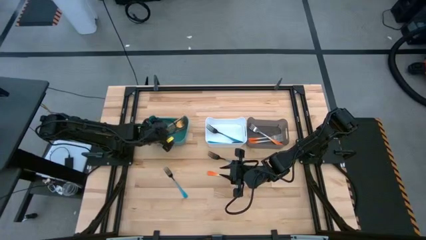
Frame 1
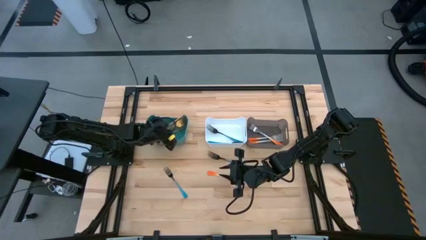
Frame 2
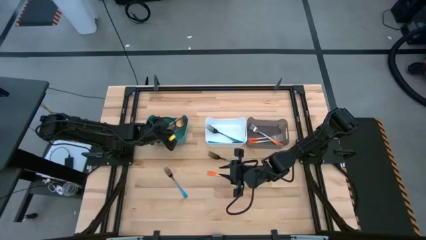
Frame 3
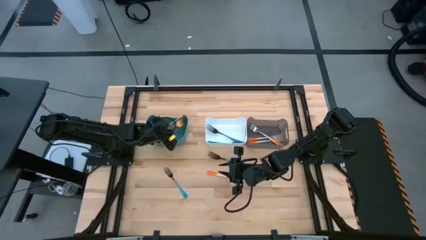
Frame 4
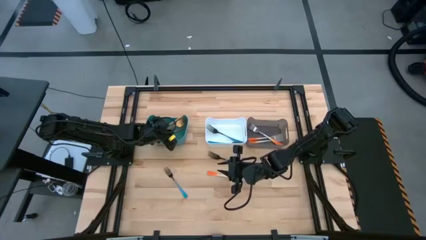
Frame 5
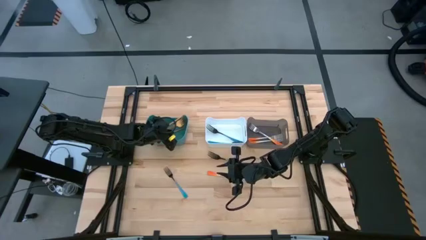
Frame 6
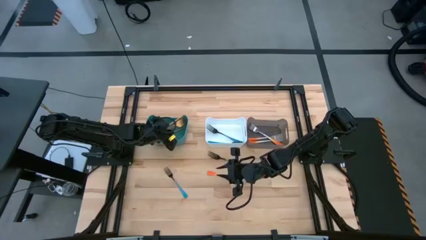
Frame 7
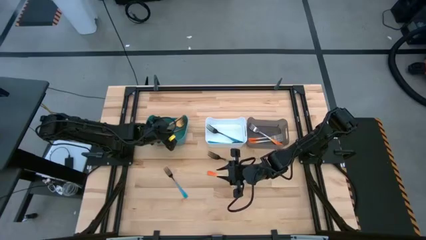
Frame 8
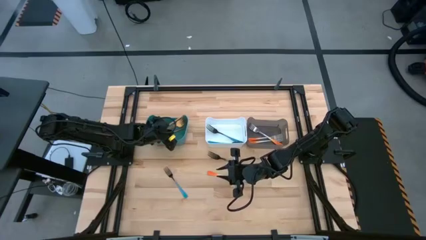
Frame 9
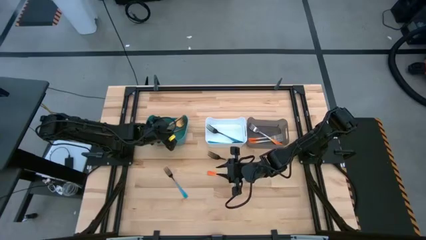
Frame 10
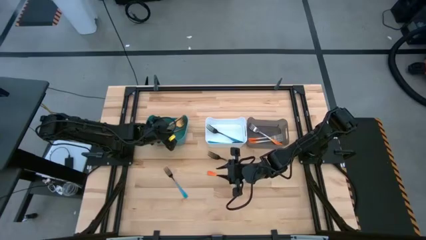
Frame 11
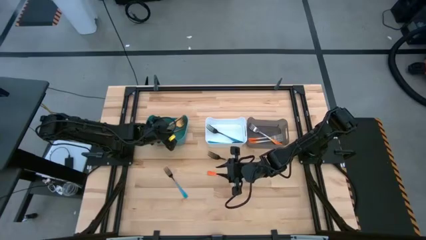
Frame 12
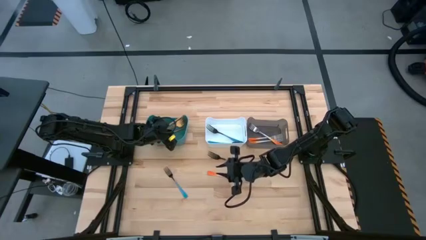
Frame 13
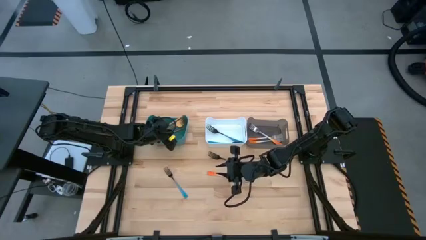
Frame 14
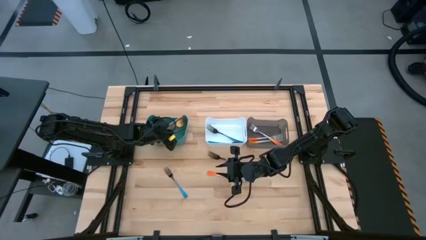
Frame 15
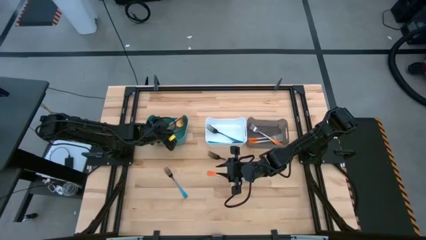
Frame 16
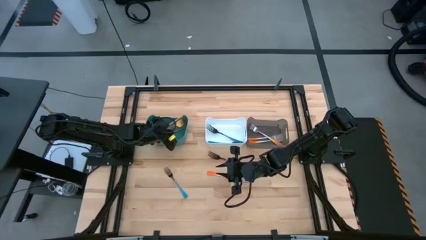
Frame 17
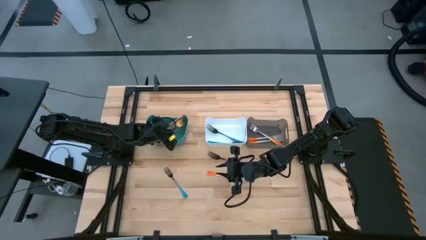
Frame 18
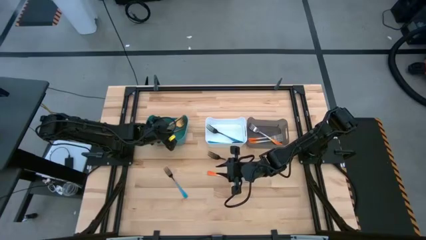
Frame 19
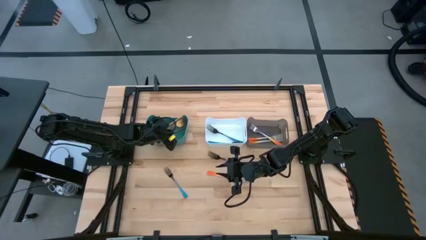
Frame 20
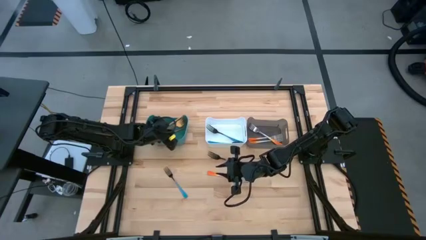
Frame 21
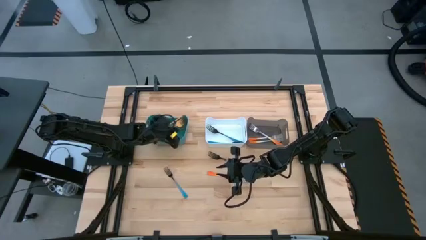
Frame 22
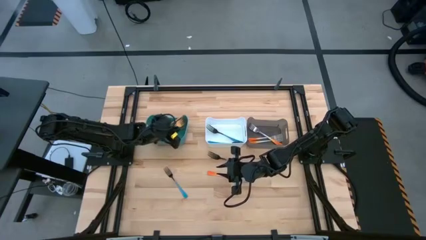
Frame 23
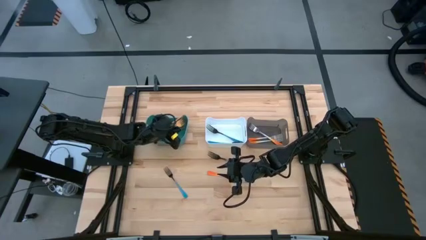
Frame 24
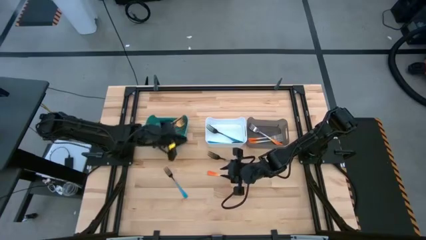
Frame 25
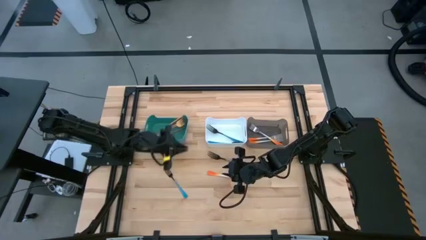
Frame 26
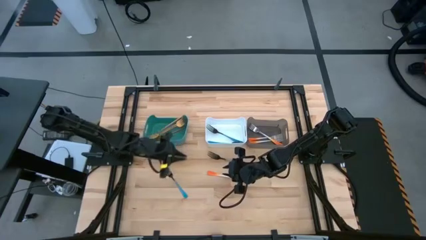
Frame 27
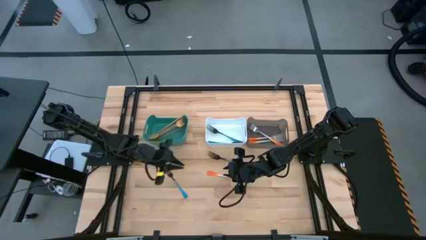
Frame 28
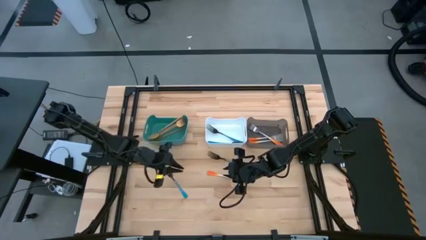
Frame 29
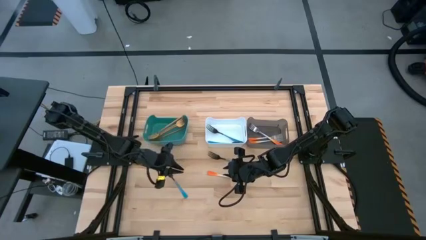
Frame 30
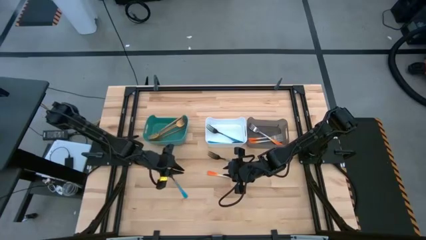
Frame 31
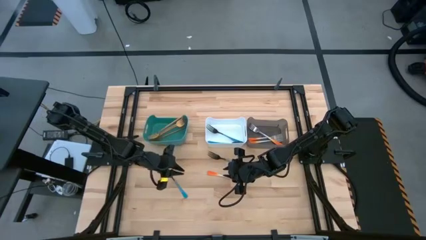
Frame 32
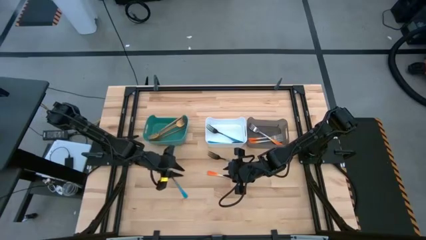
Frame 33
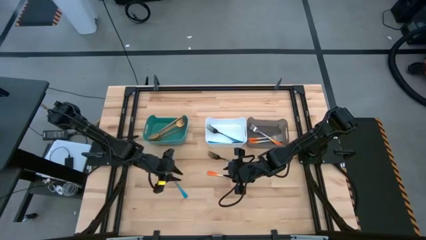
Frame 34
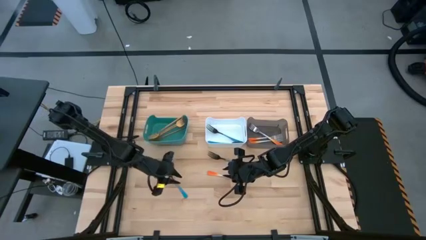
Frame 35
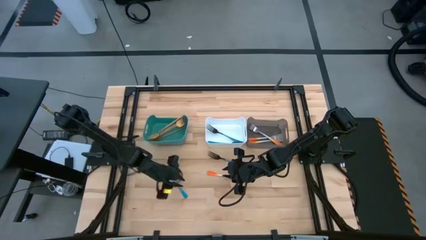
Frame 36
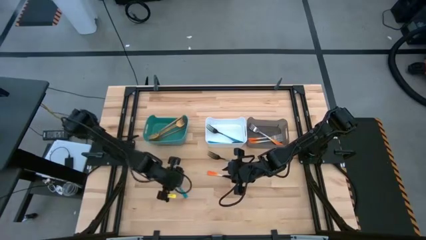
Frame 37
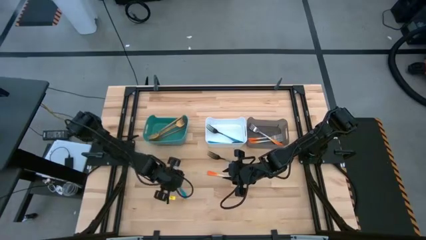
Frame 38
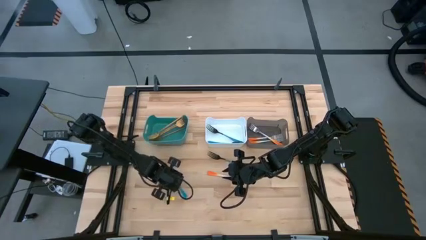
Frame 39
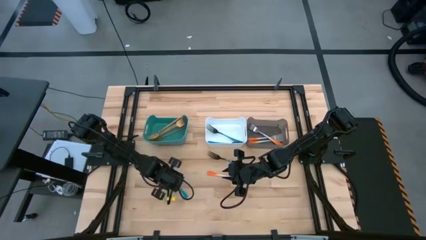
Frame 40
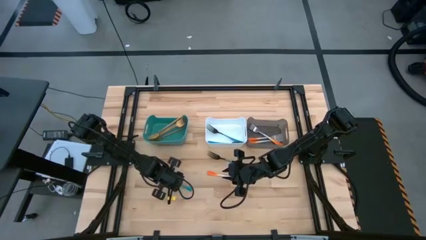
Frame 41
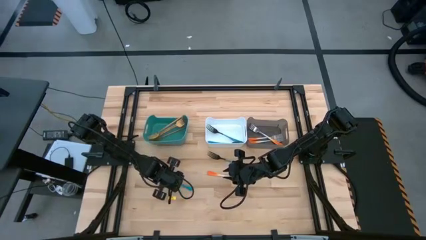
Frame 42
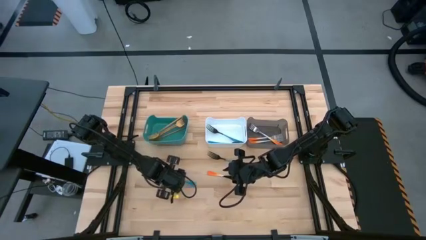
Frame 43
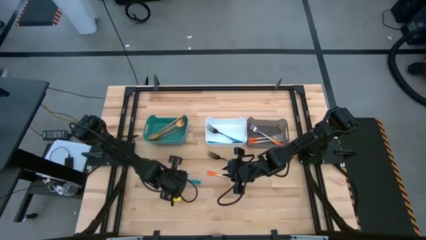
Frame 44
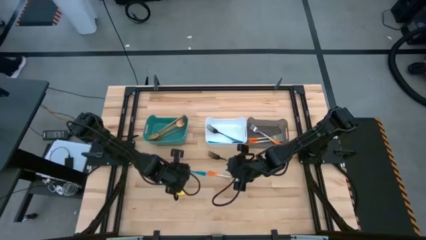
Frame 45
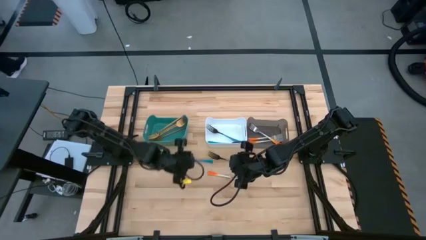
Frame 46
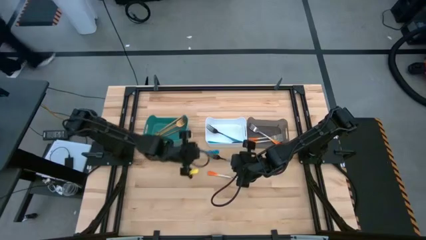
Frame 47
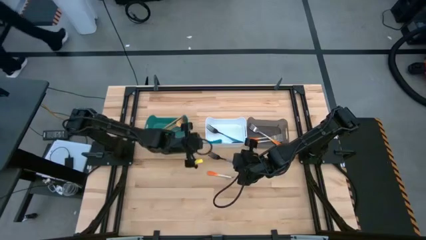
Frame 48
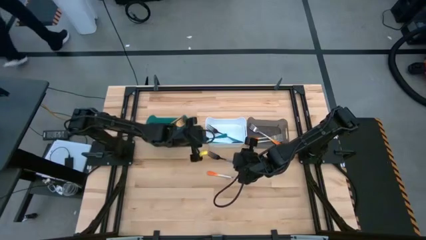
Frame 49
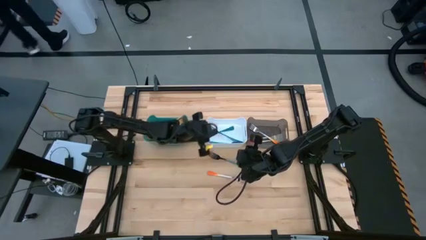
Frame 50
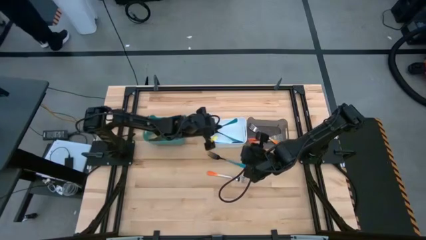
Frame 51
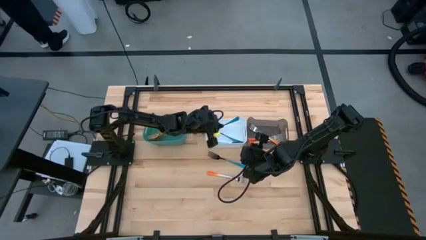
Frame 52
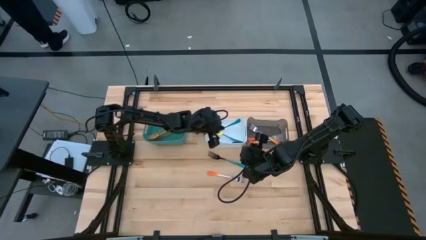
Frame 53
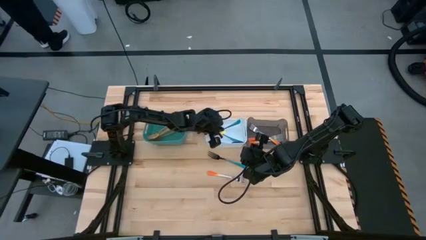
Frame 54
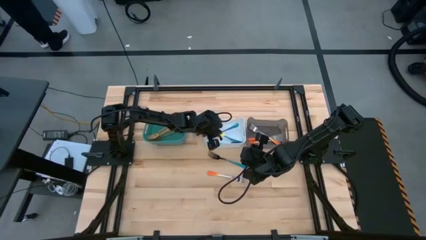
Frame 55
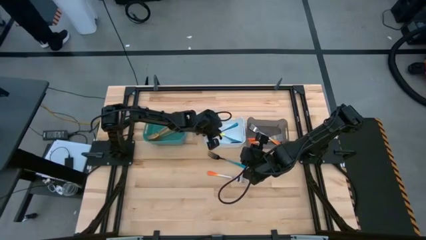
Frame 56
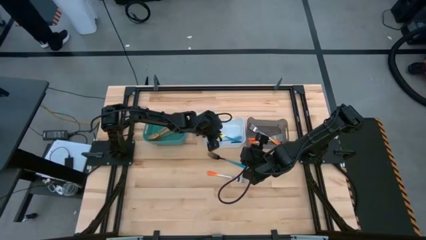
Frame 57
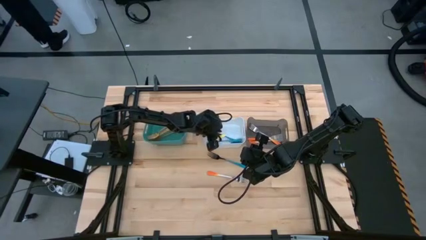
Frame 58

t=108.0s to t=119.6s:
Task: Sort silverware by color (type)
Put the left blue fork into the white bin

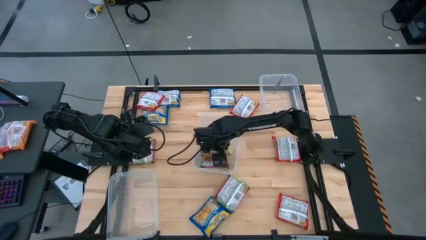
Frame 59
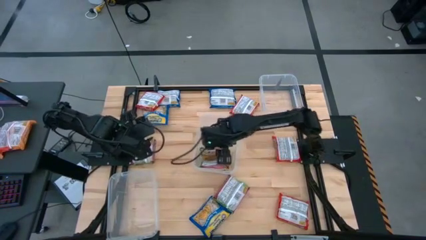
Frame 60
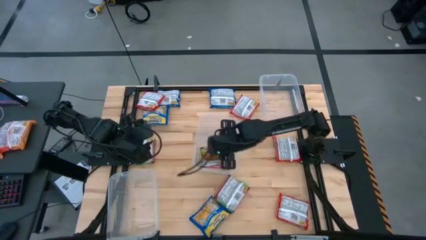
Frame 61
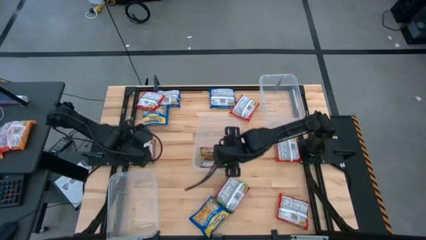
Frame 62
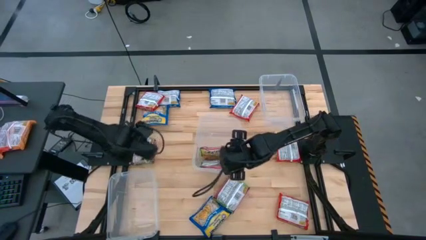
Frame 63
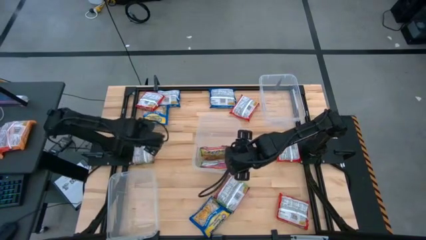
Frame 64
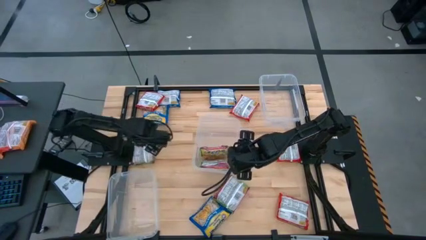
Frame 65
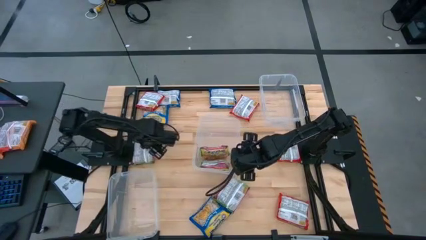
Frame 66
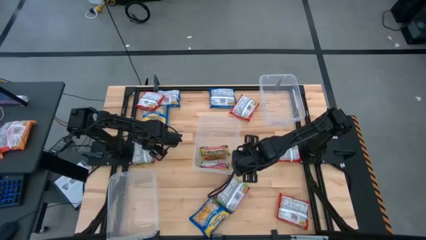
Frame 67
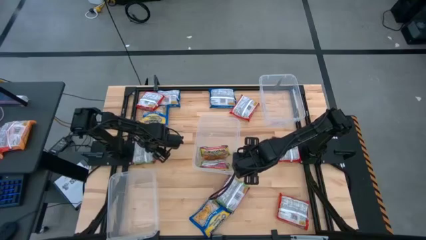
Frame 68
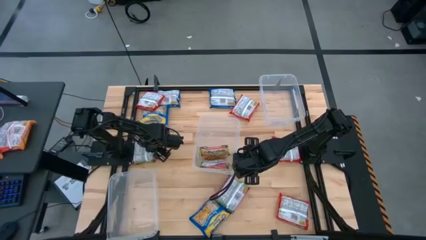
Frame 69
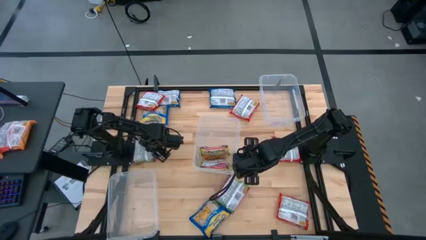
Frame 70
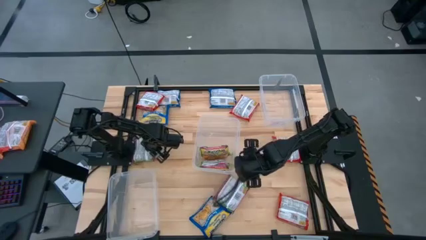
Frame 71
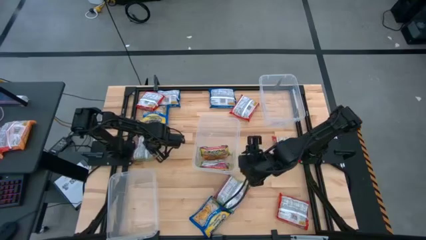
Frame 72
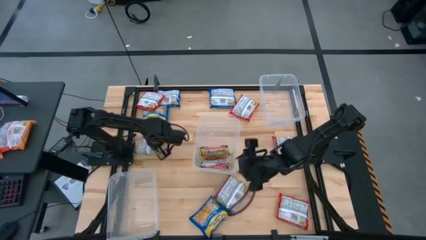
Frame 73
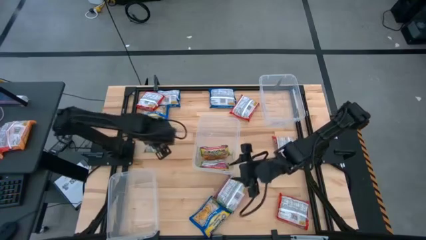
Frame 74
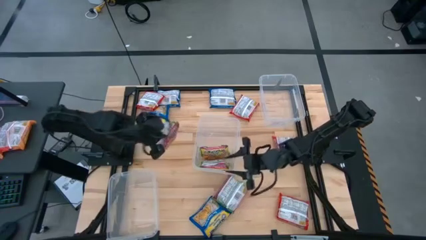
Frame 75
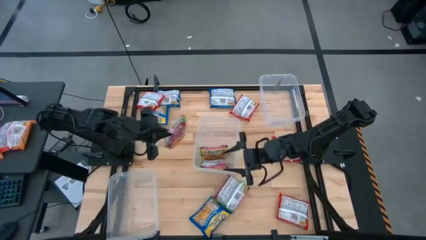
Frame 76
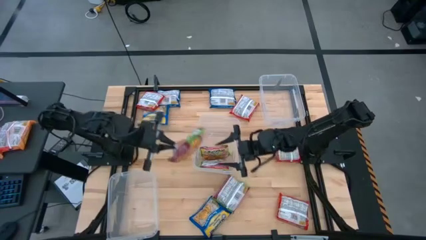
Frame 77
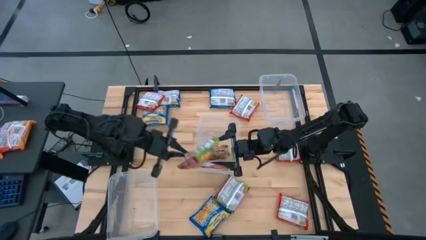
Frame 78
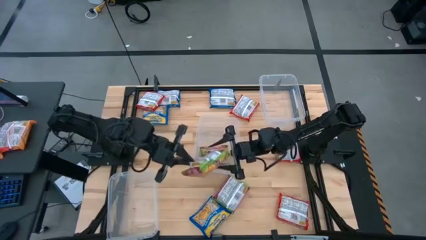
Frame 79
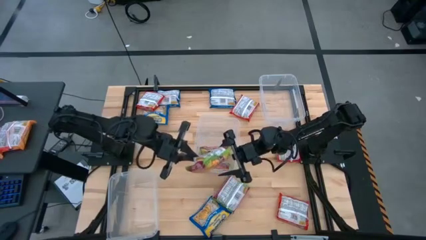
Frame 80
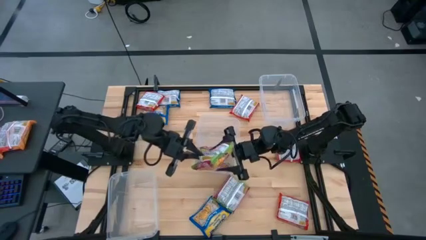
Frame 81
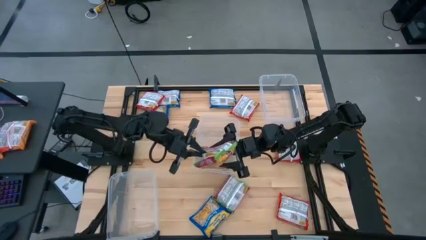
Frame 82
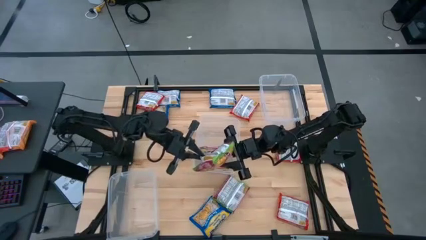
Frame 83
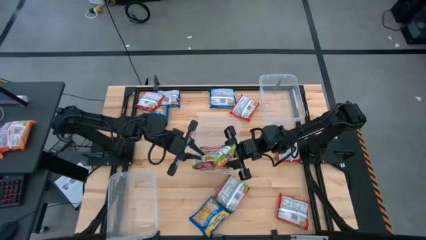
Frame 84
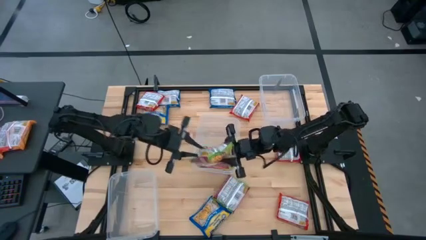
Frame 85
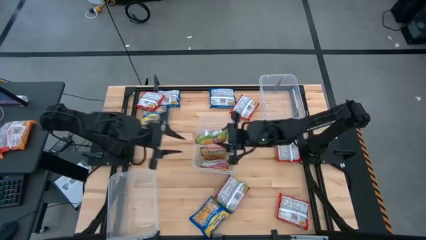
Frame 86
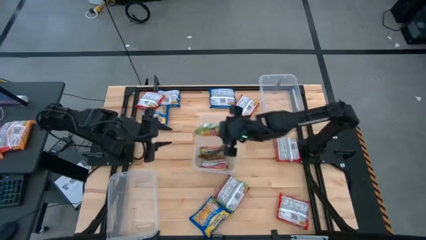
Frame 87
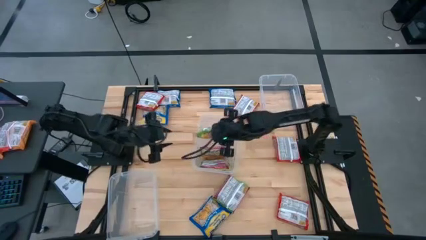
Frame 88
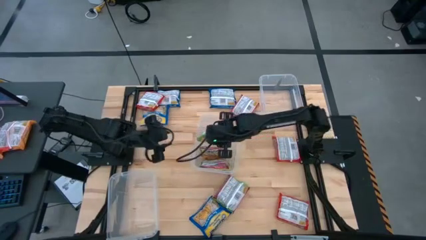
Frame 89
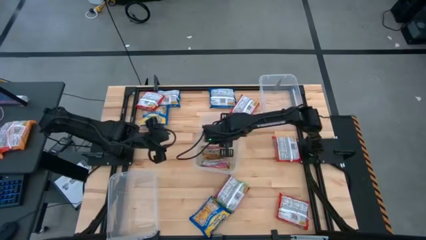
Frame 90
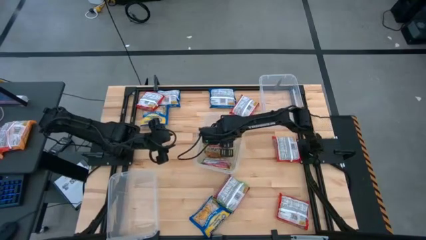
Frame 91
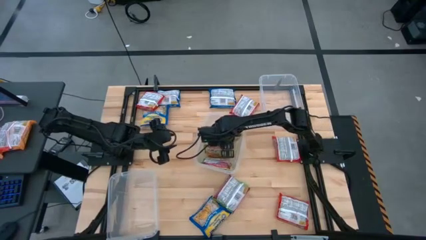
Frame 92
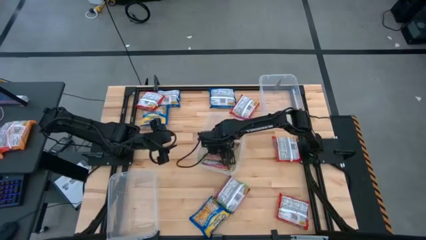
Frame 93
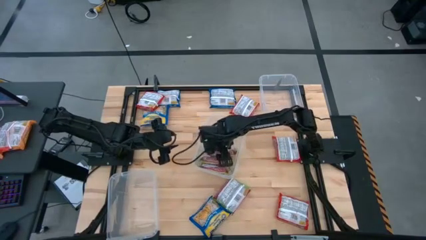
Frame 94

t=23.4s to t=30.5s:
Task: Sort Maruchan noodles
Put the green noodle pack into the middle transparent container
